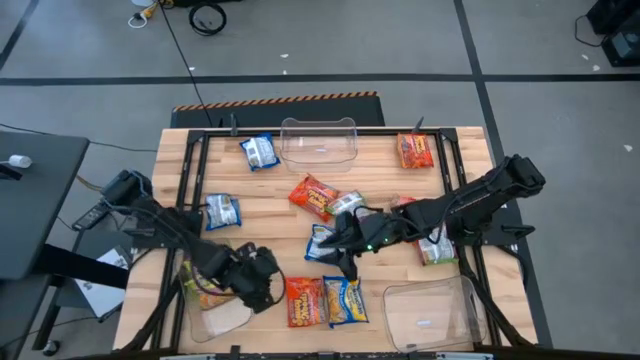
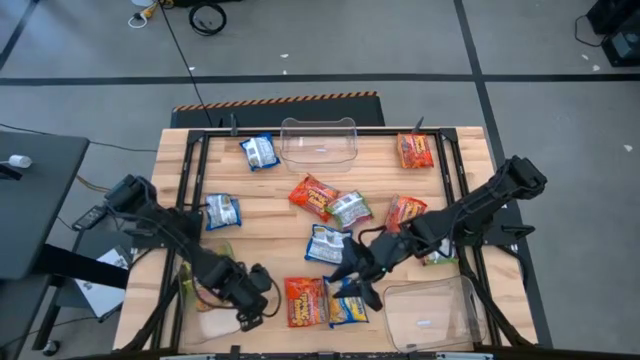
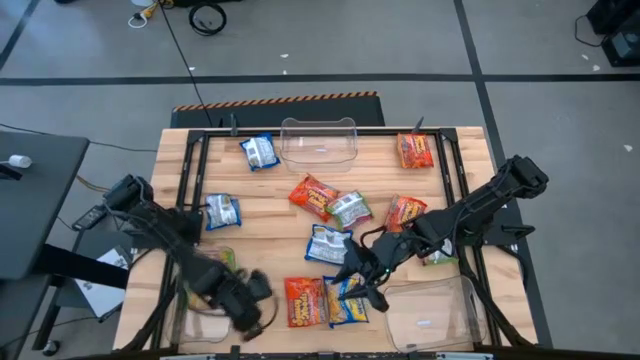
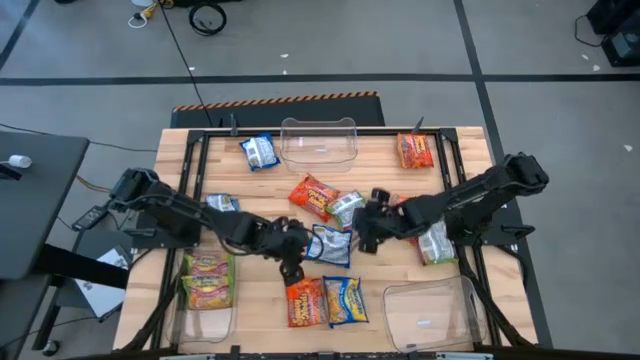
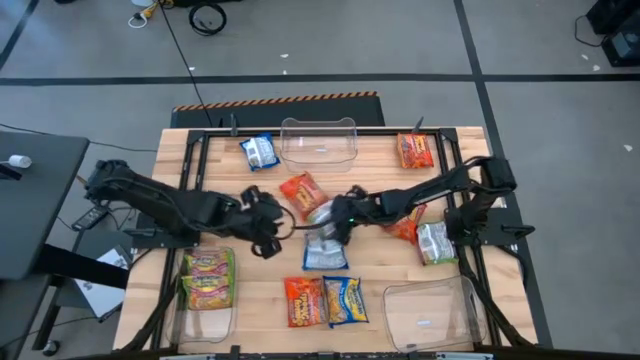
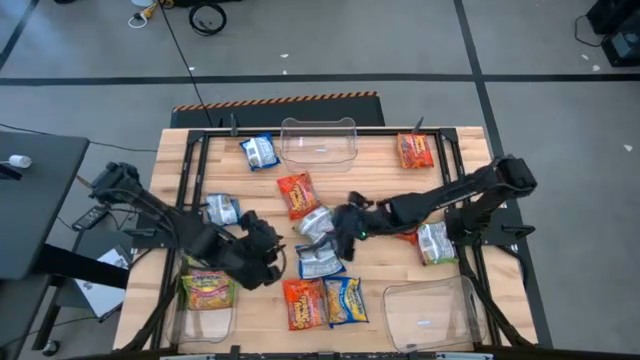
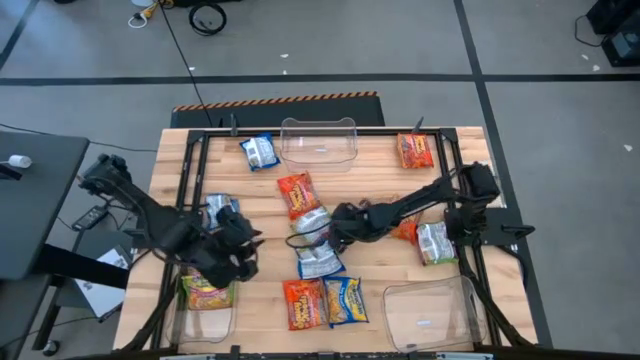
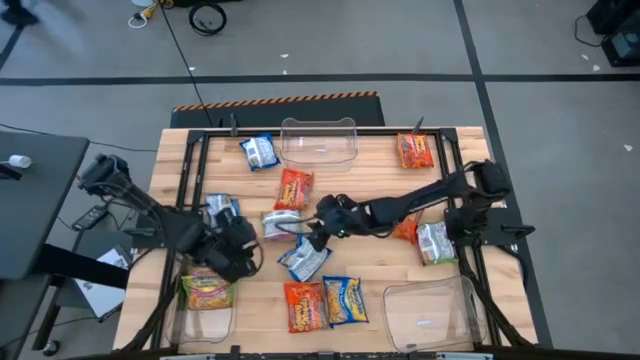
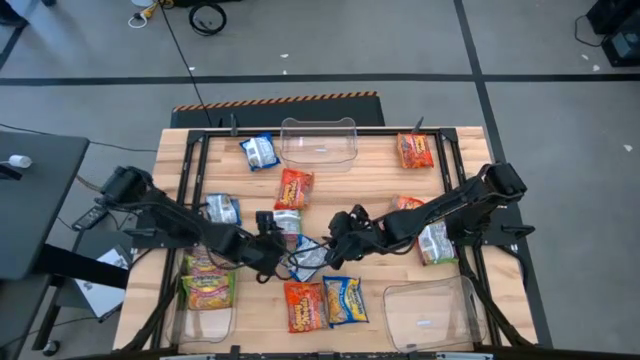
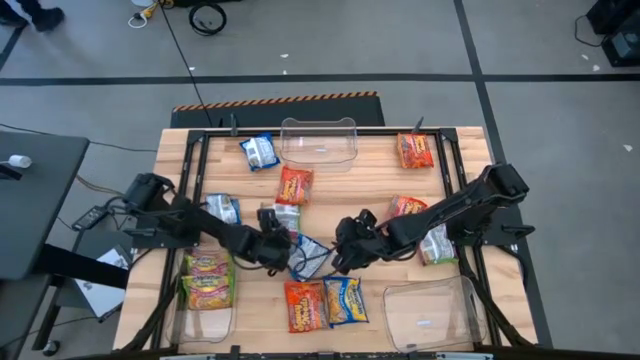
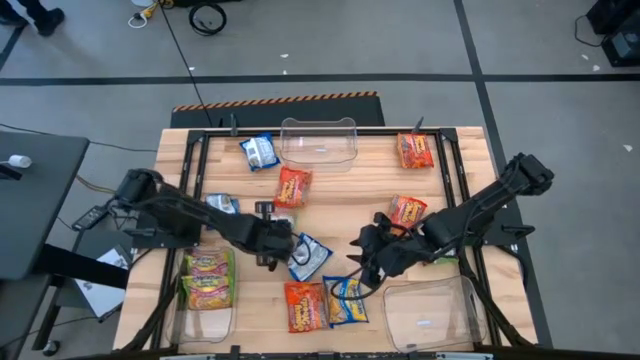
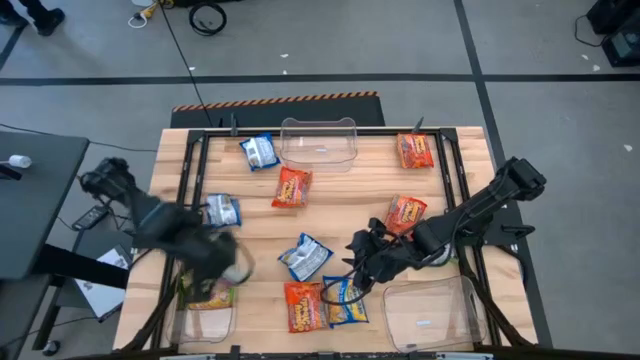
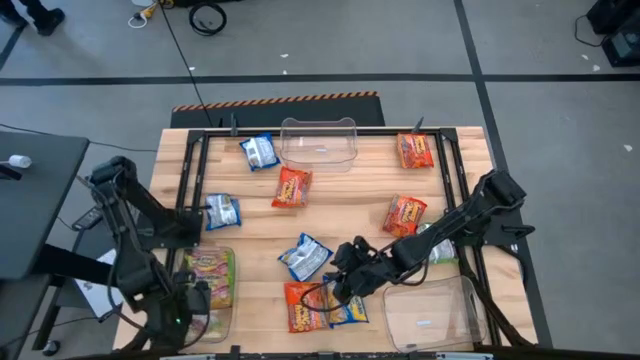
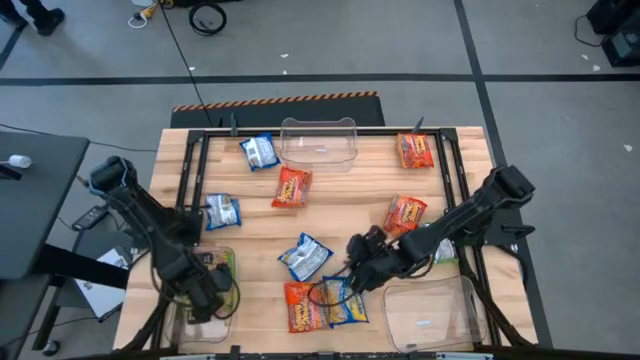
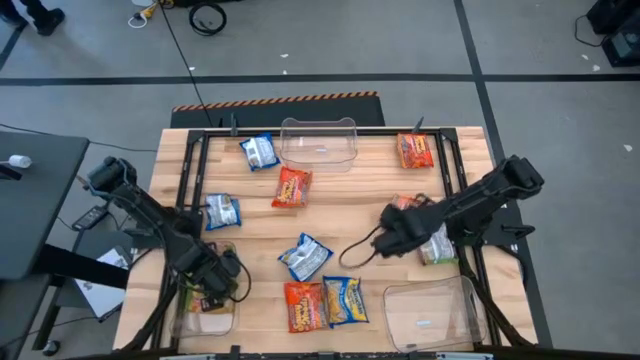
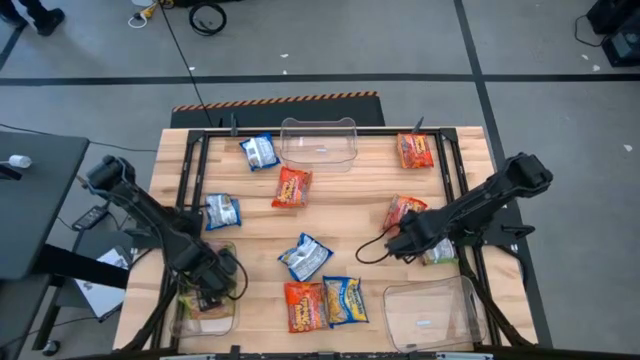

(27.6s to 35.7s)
Task: Sort Maruchan noodles
Put the green noodle pack into the bottom left transparent bin

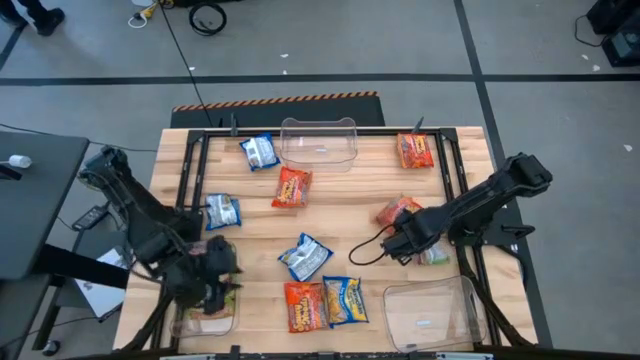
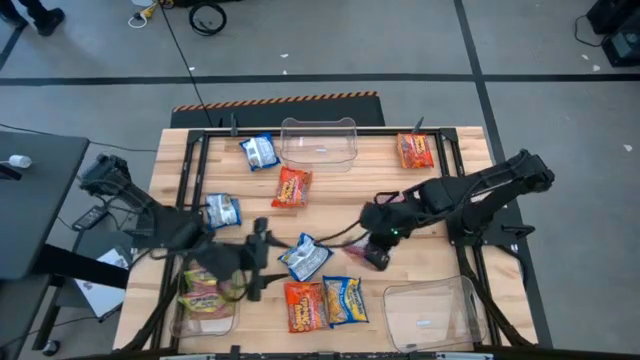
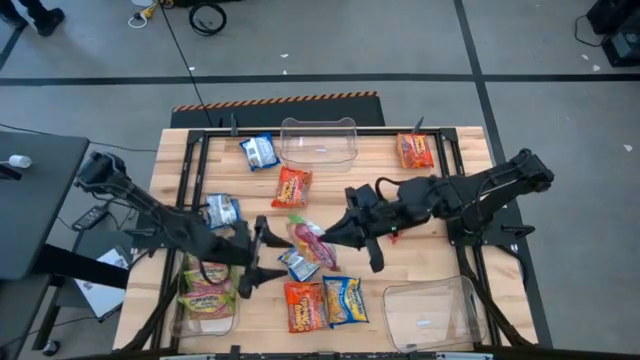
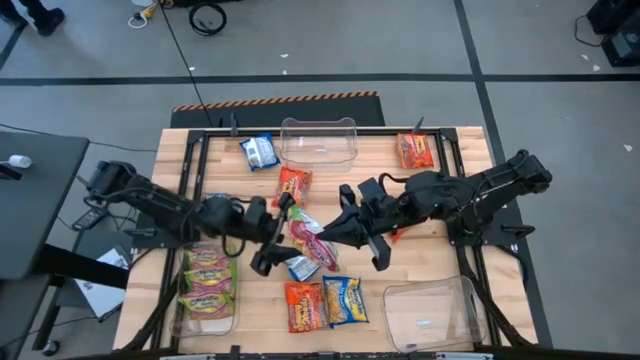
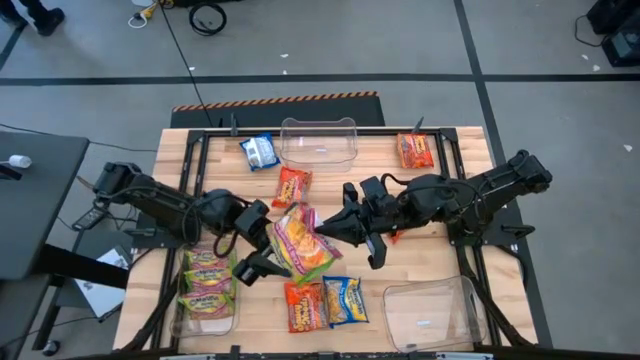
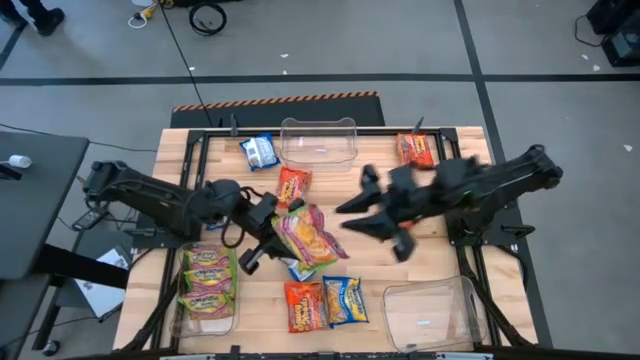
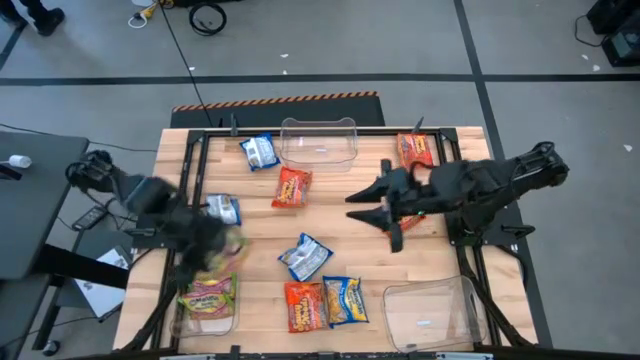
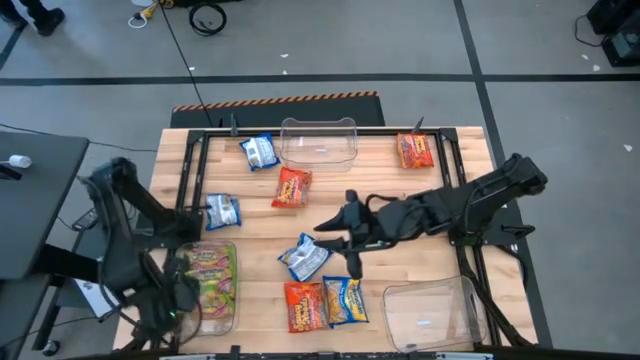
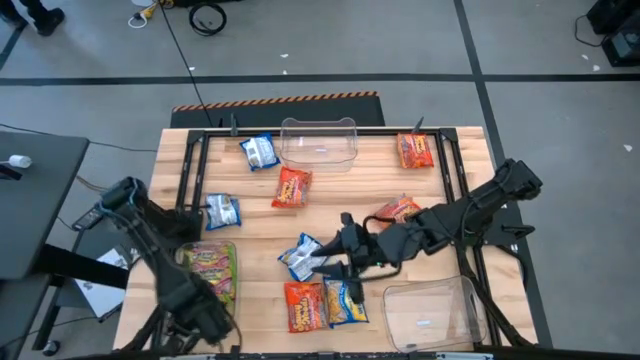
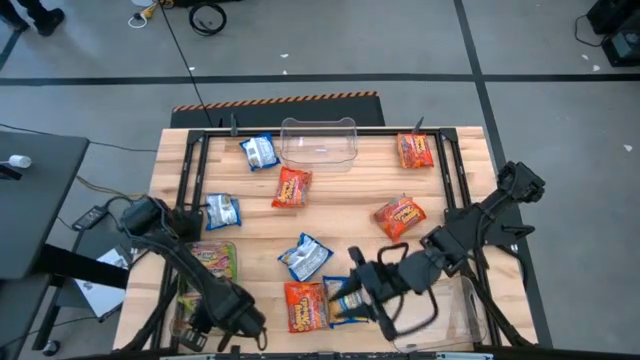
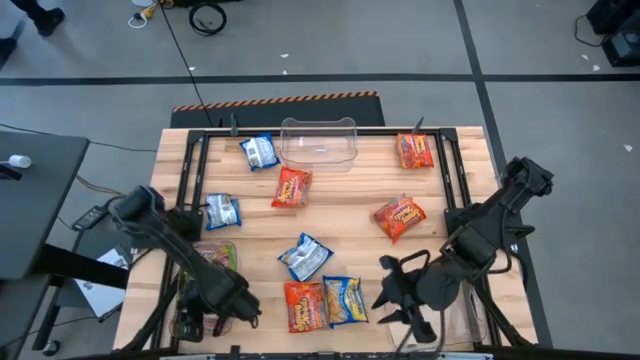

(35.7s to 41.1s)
Put the green noodle pack into the bottom left transparent bin

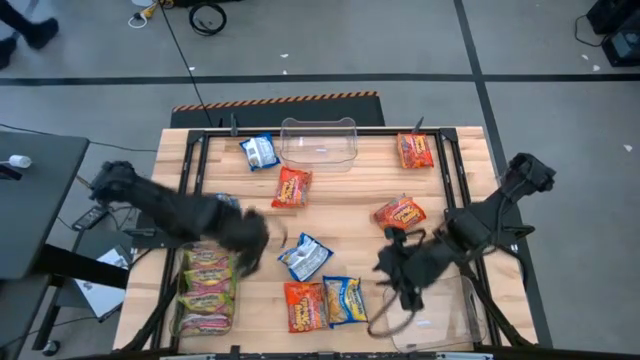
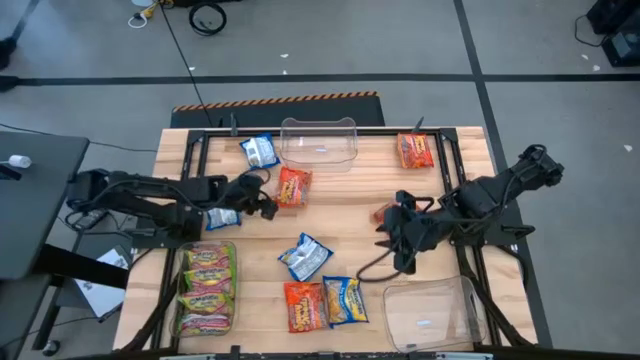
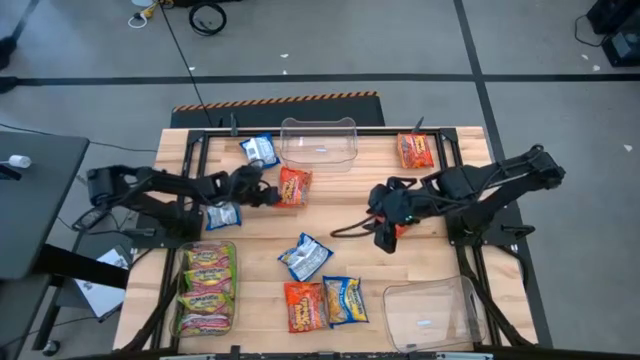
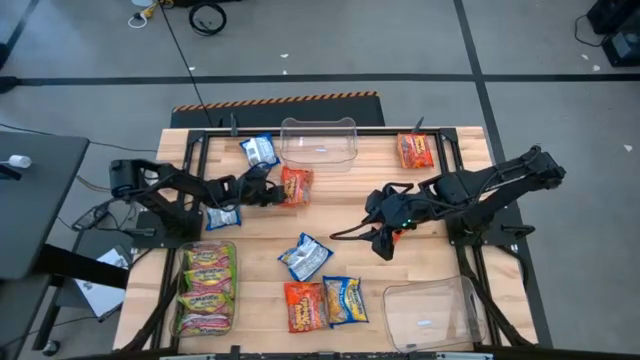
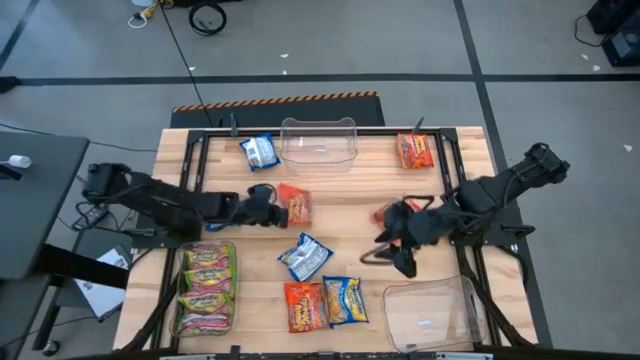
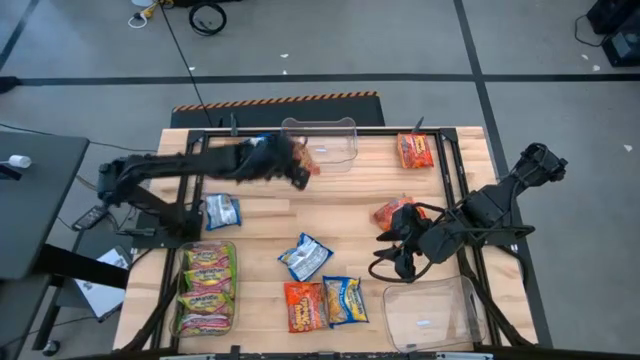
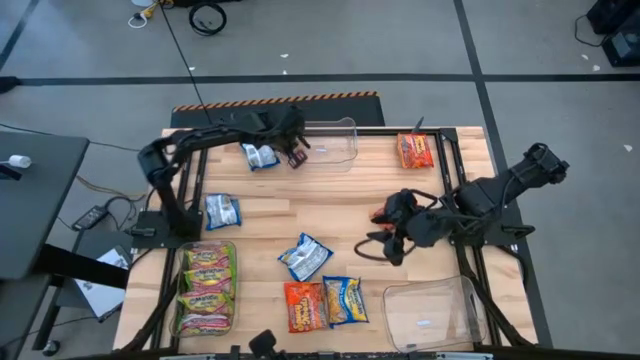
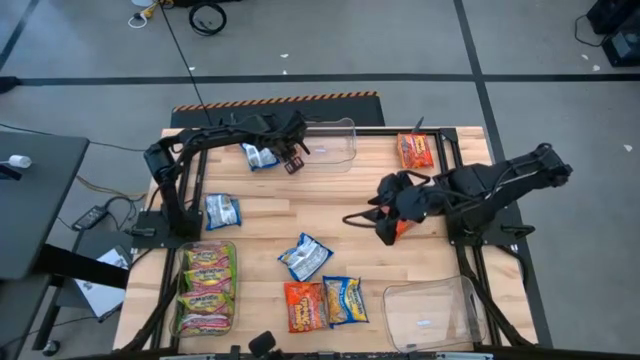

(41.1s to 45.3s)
Put the orange noodle pack into the top transparent bin

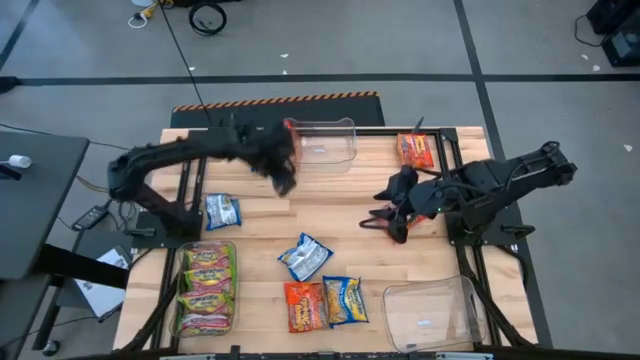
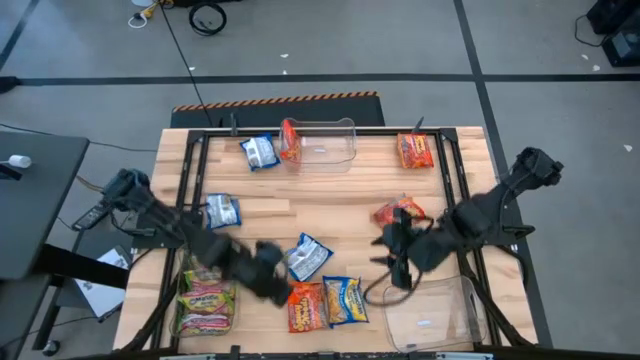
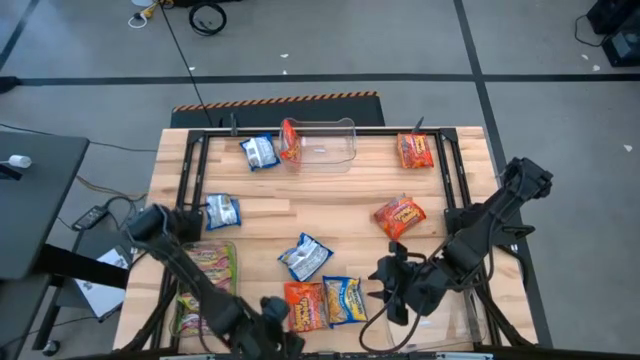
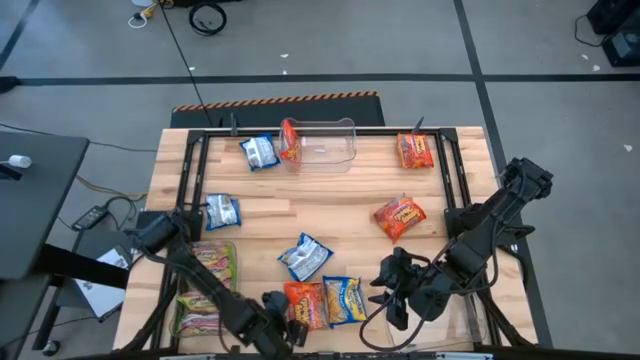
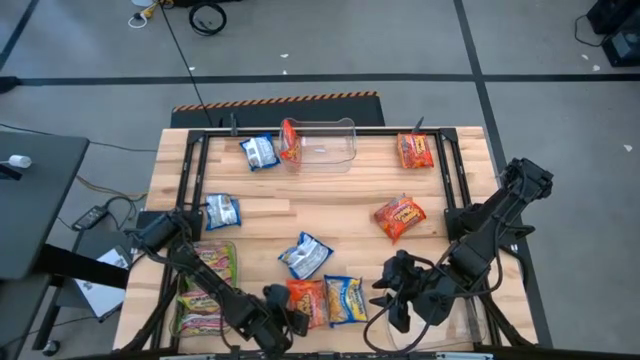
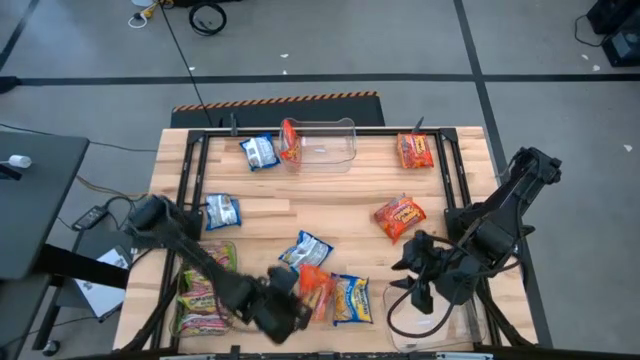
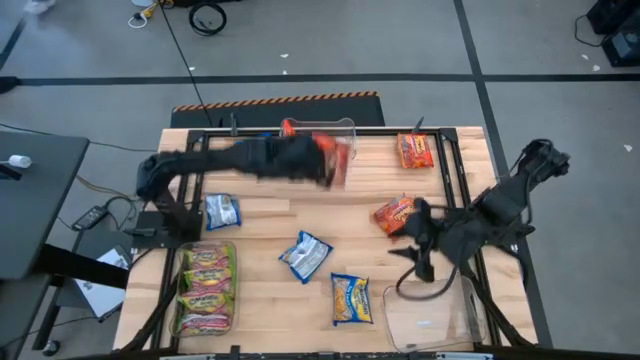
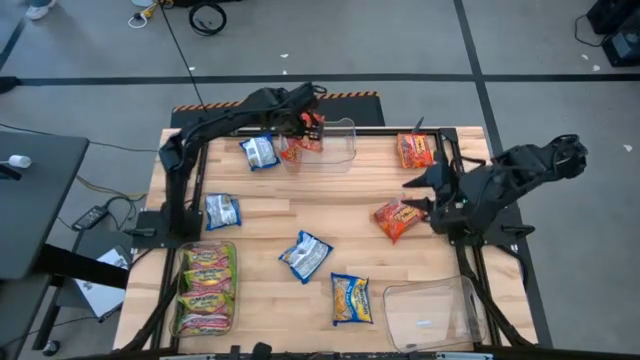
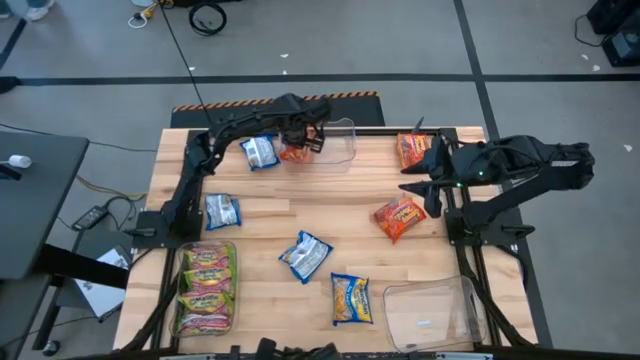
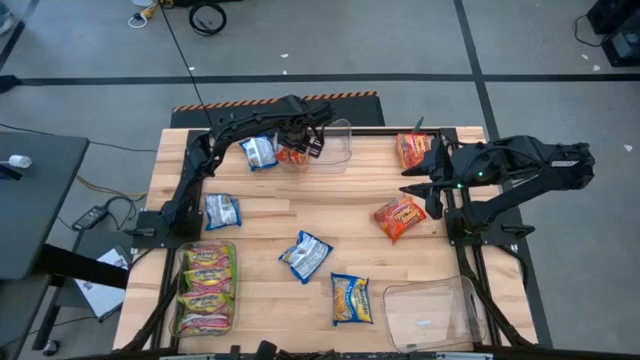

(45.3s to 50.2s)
Put the orange noodle pack into the top transparent bin
